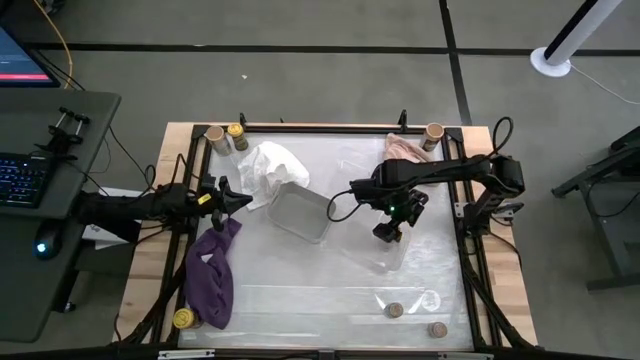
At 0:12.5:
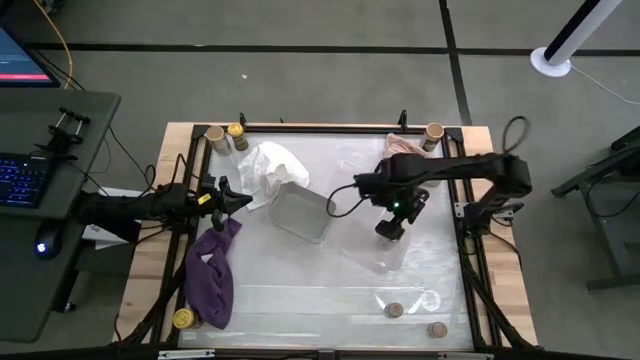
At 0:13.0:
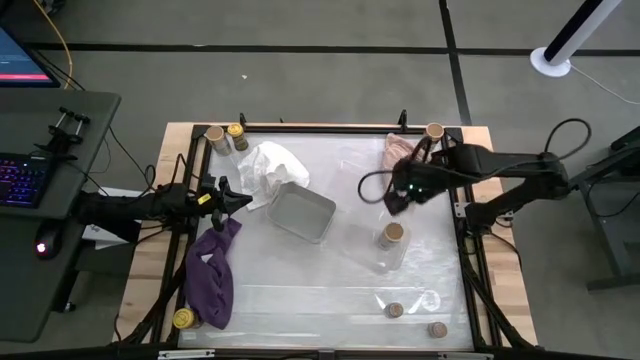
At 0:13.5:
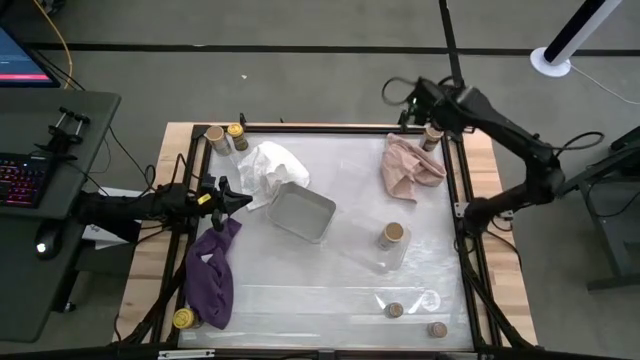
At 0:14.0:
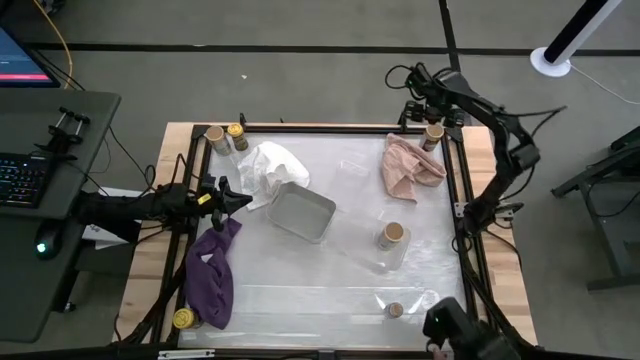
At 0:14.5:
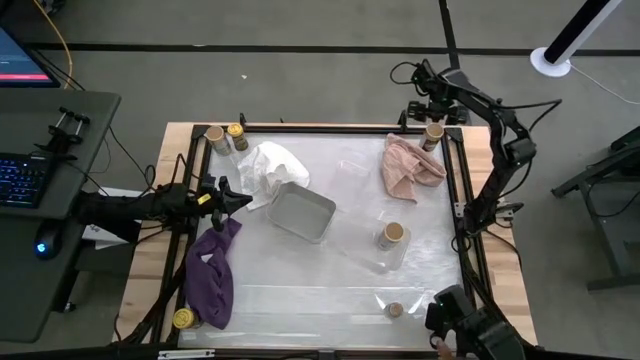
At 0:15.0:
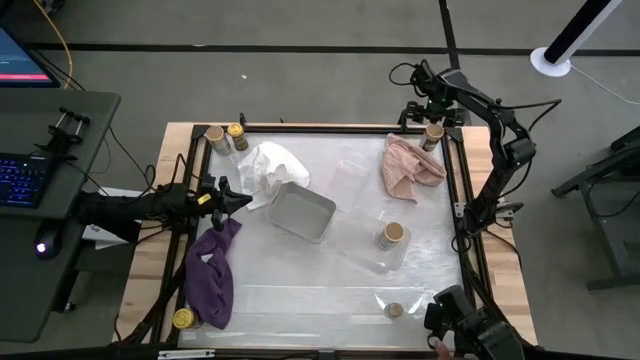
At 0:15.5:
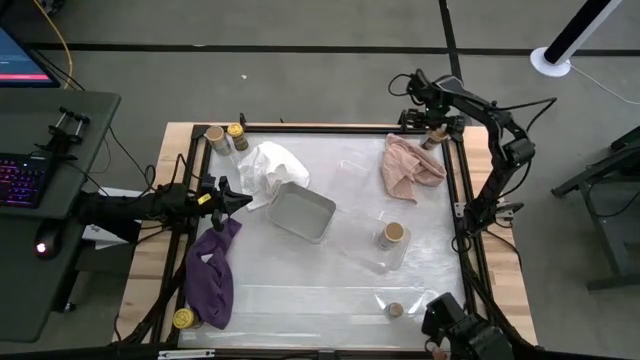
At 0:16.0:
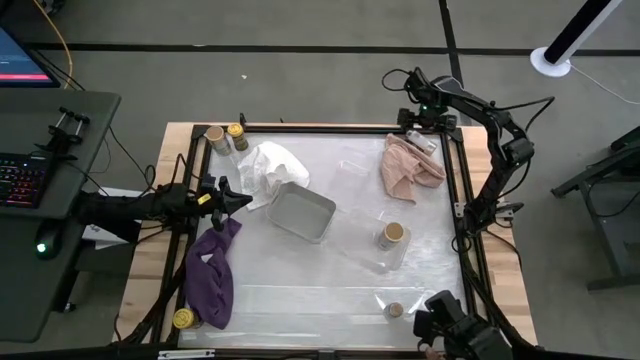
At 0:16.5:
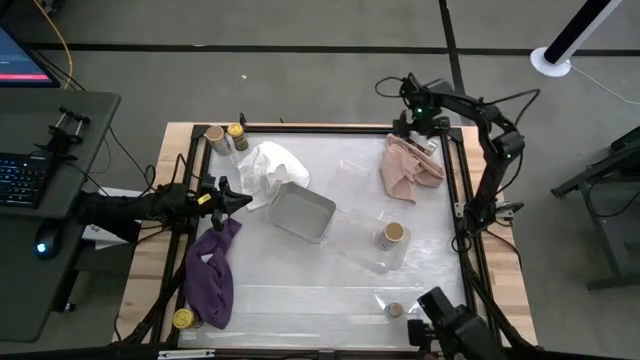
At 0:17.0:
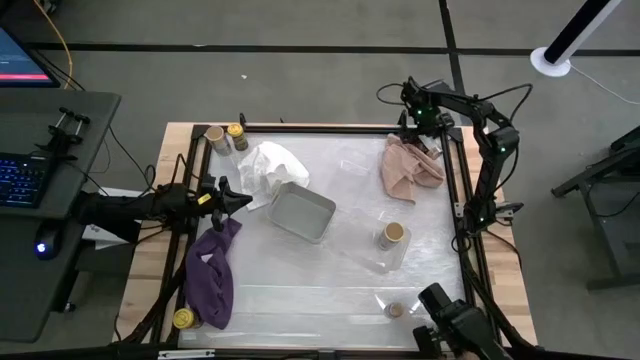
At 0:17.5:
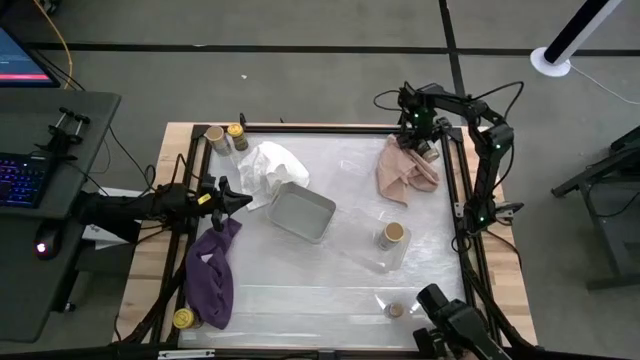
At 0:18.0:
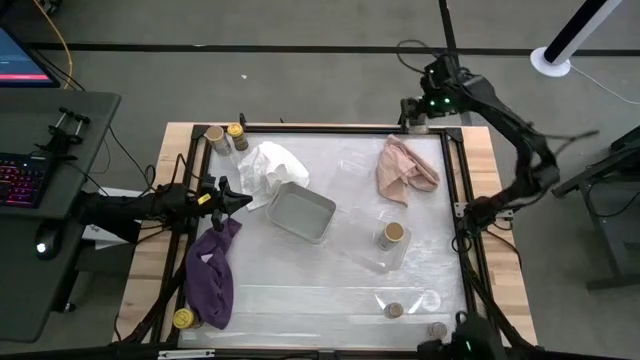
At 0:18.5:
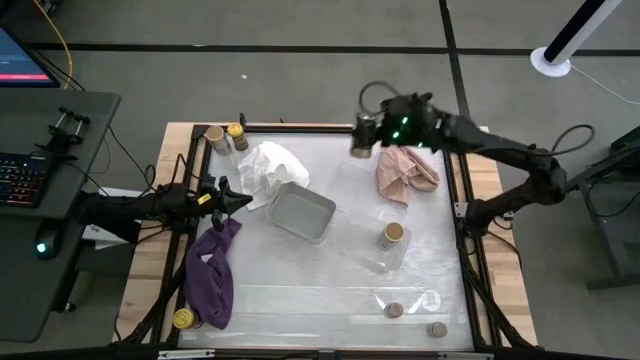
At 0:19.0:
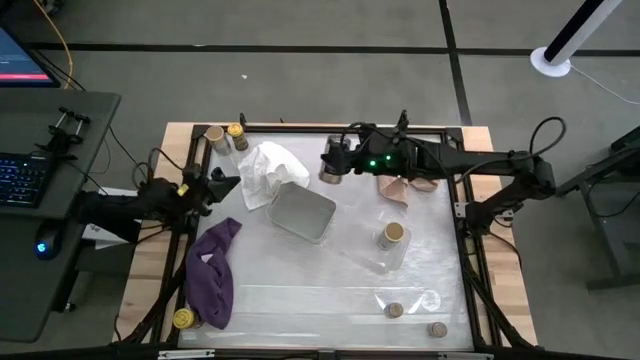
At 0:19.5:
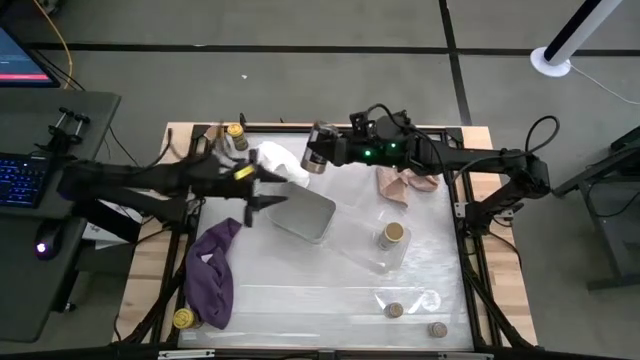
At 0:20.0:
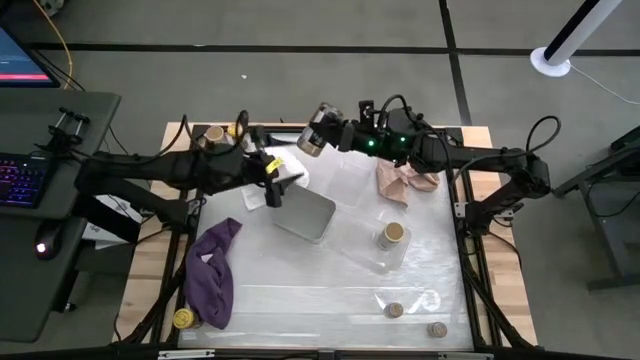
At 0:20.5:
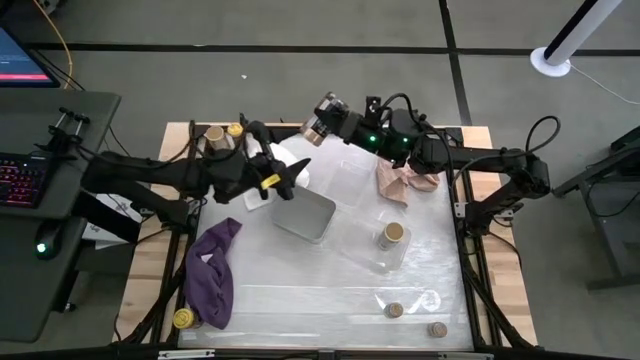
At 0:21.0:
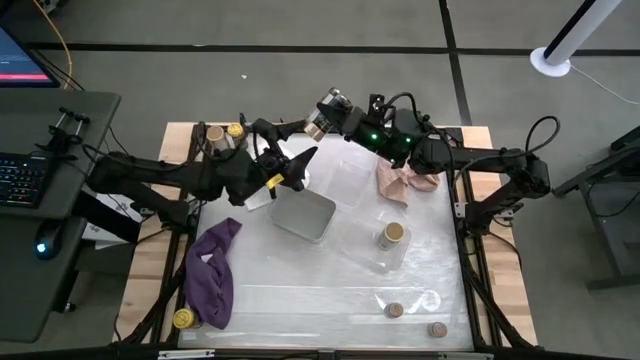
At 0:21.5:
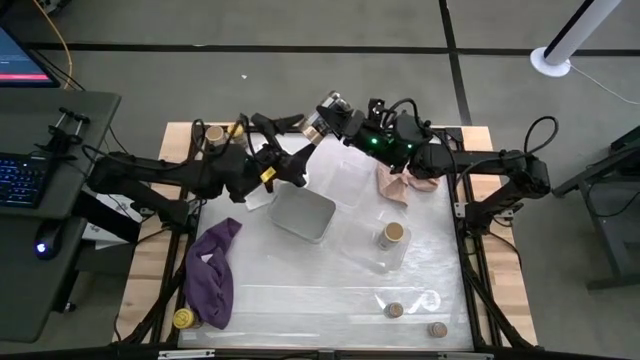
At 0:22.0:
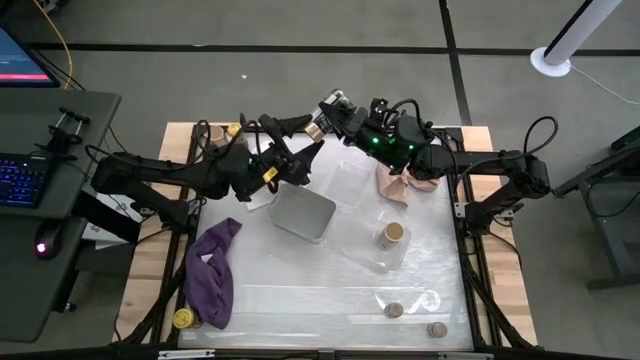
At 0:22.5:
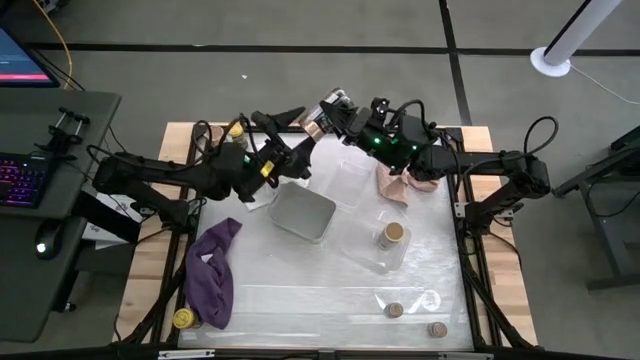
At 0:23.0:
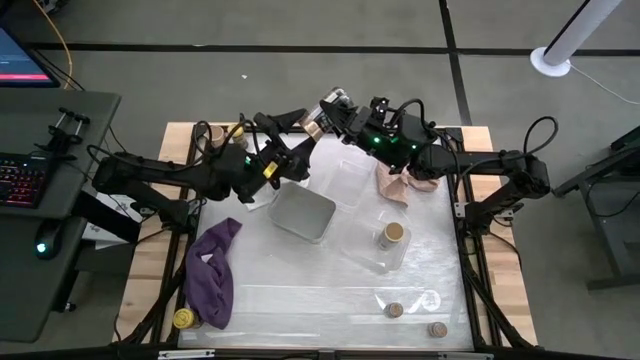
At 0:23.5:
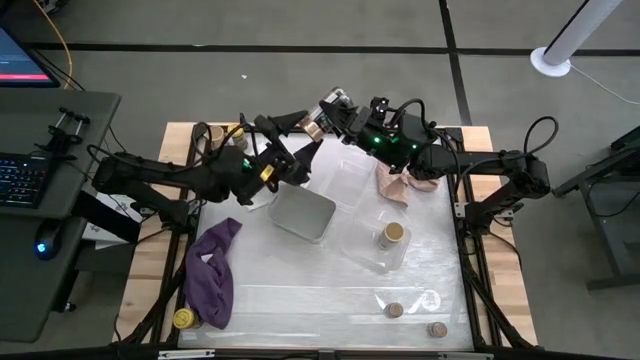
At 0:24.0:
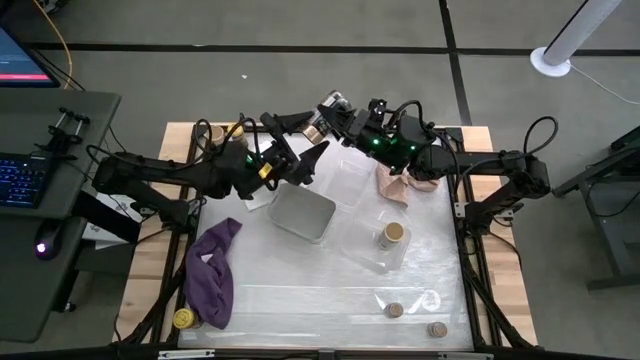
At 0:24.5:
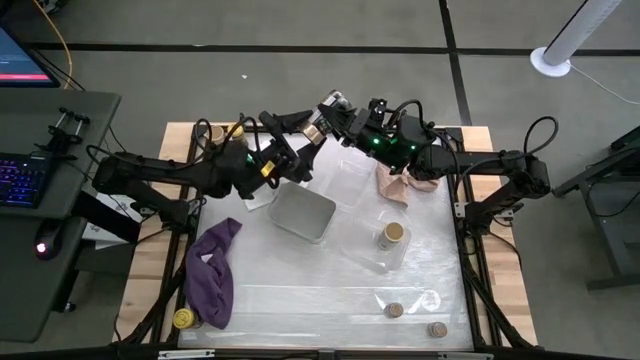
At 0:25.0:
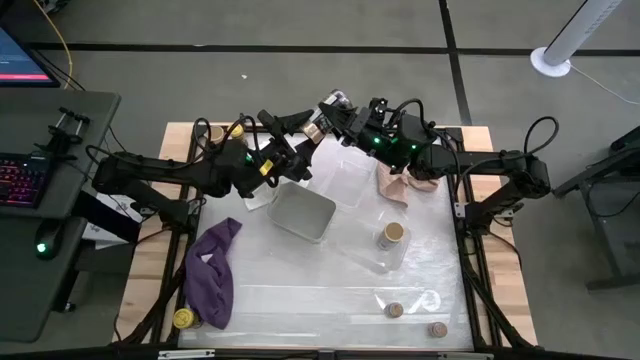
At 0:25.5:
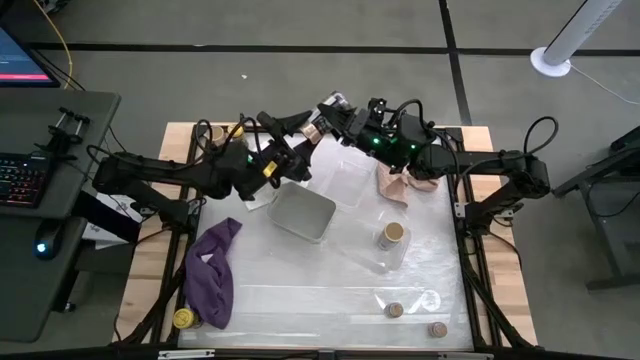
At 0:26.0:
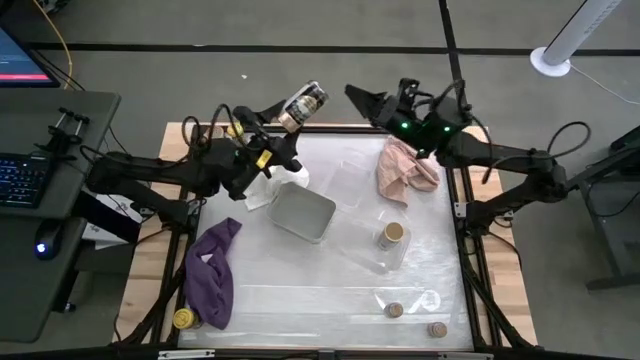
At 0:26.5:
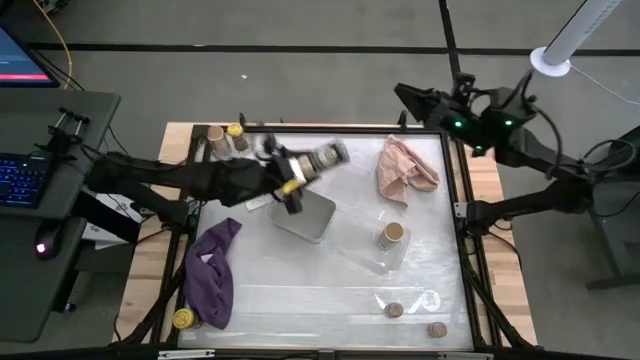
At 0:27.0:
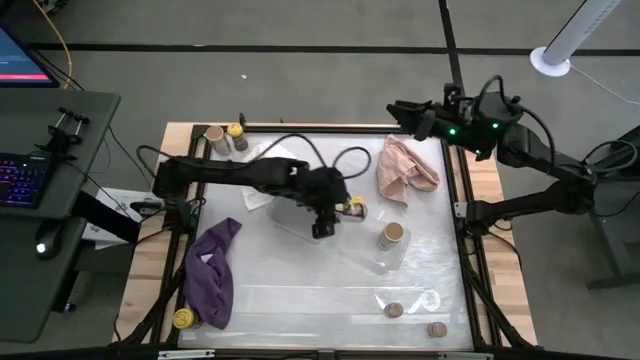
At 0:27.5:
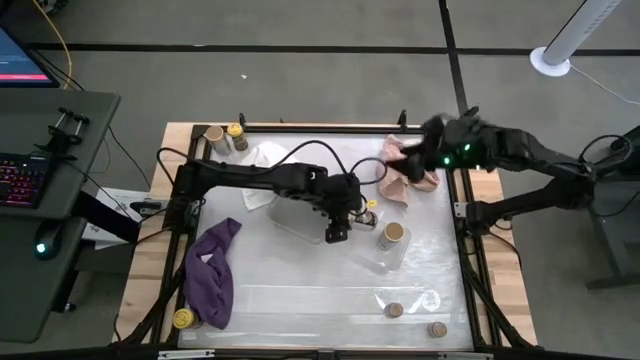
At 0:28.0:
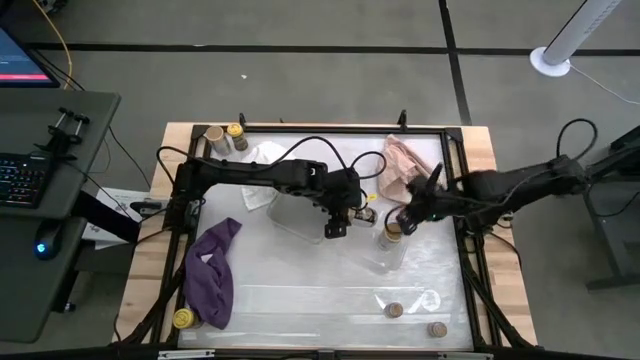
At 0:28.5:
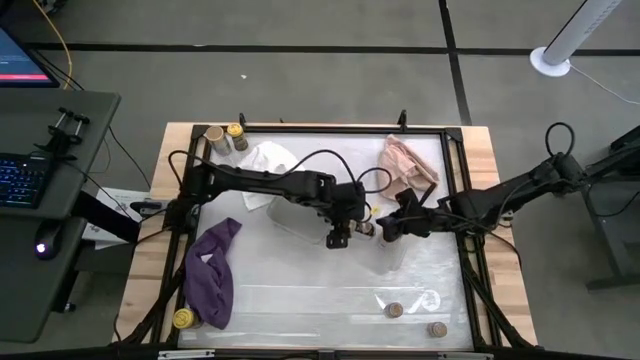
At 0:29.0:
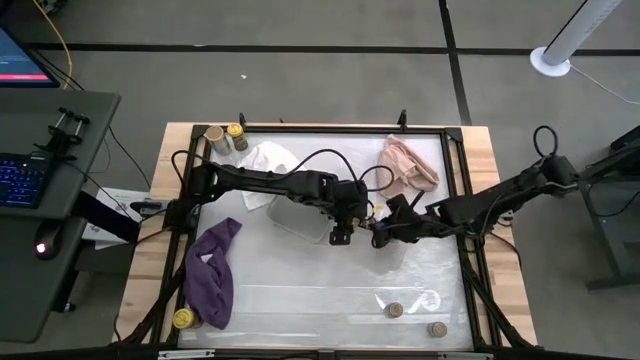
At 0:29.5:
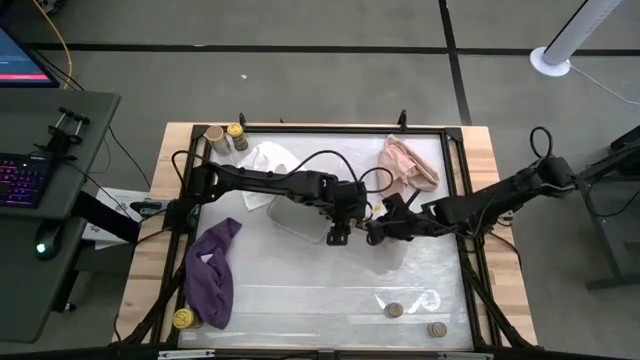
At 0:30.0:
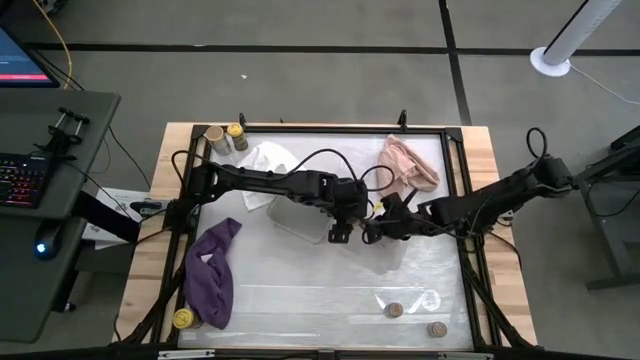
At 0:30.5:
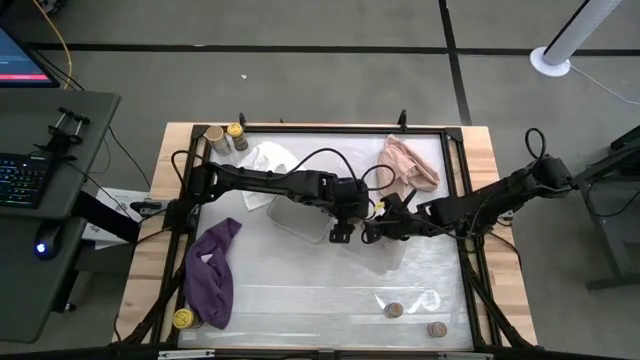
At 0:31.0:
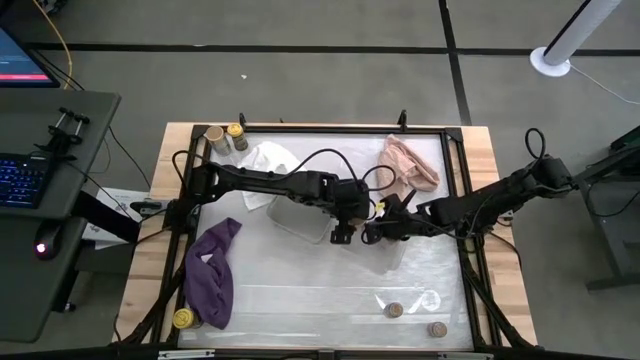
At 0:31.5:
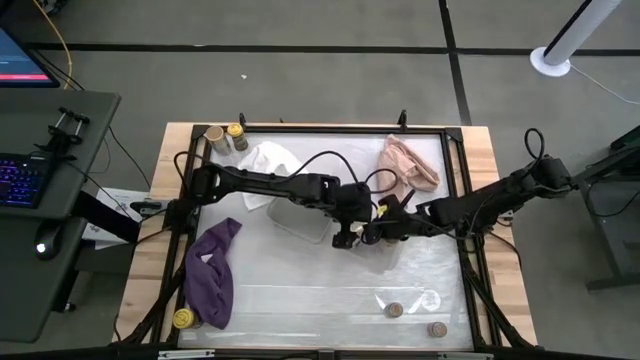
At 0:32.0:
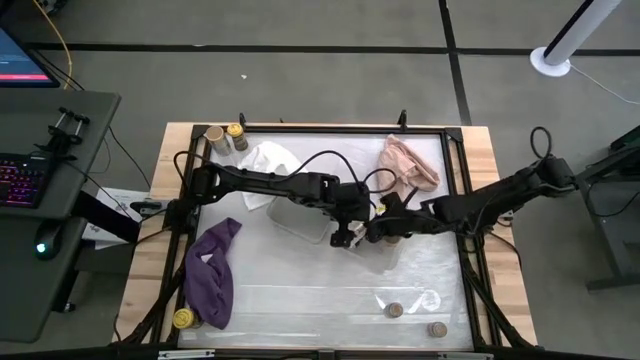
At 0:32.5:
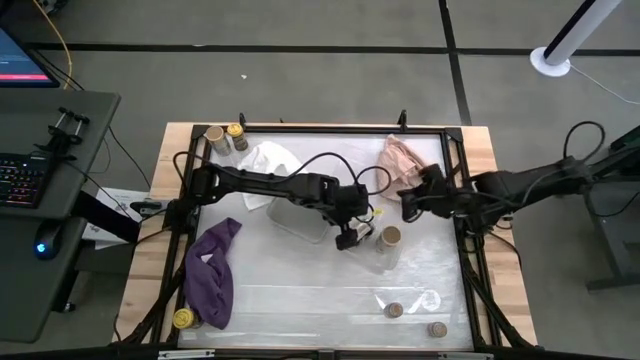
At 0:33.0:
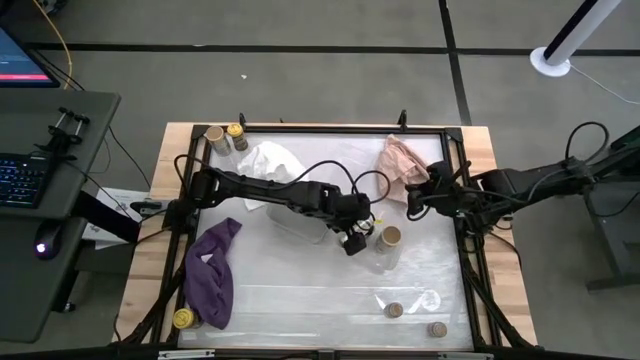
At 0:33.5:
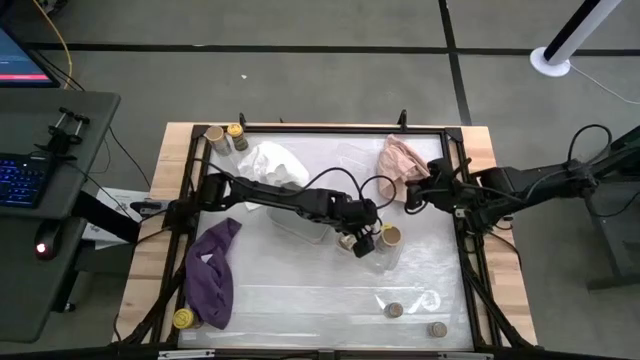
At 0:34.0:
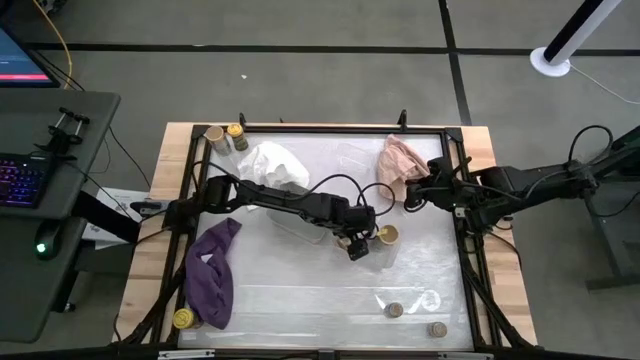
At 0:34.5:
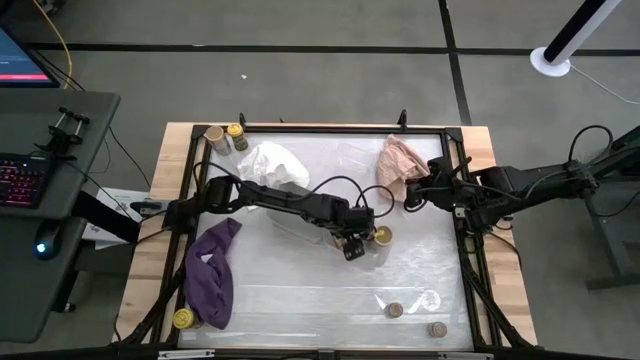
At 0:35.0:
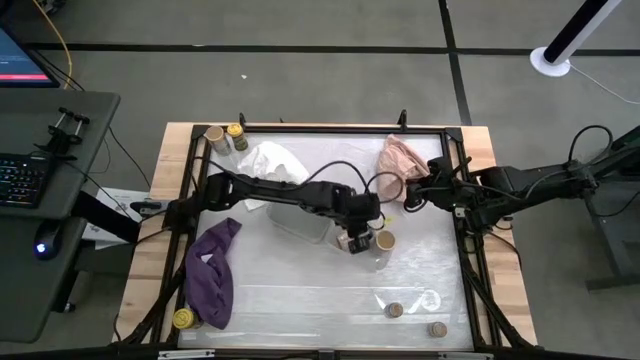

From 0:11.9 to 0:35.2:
Task: Sort spices by type
Put the right gold seasoning bottle into the bottom transparent bin
